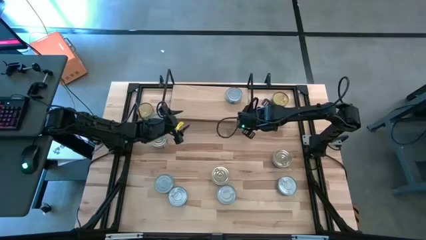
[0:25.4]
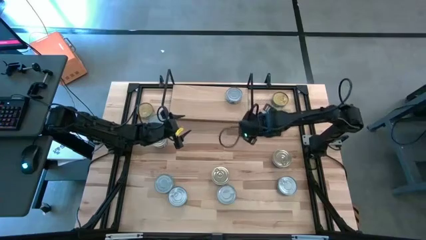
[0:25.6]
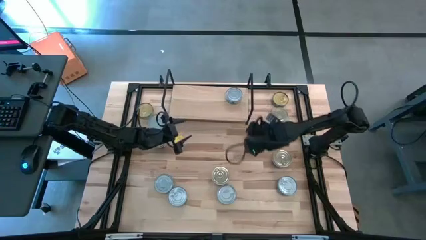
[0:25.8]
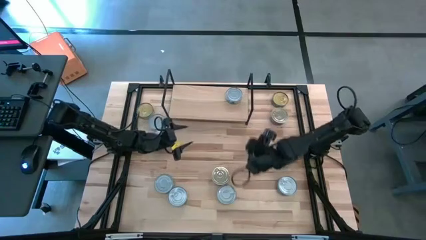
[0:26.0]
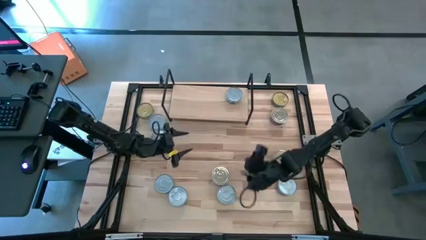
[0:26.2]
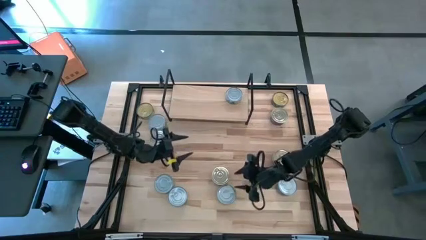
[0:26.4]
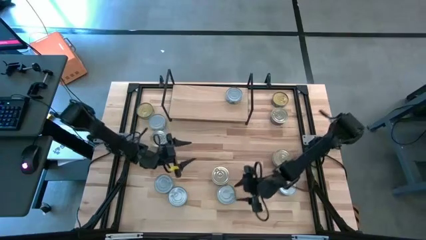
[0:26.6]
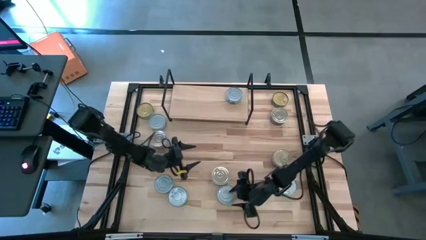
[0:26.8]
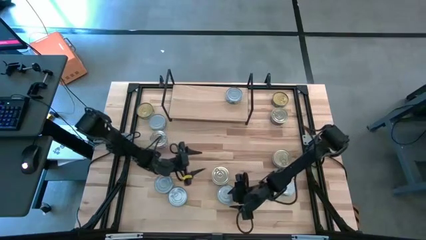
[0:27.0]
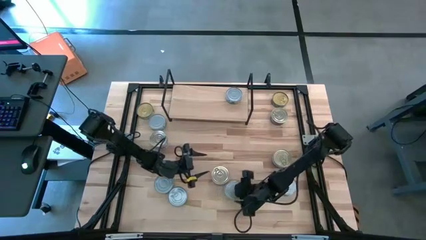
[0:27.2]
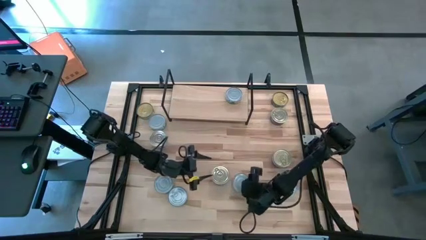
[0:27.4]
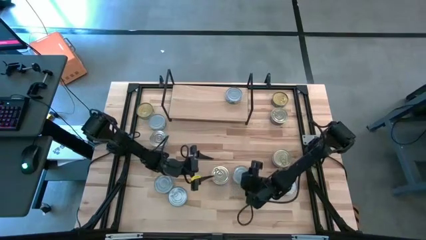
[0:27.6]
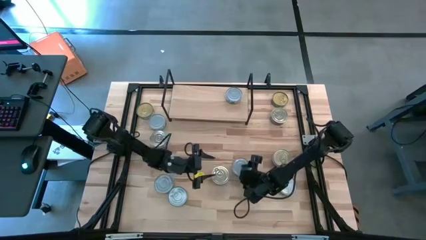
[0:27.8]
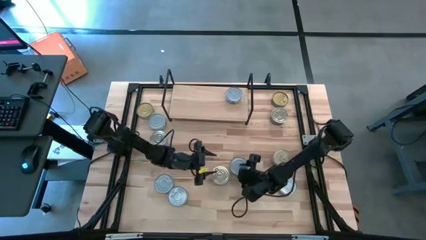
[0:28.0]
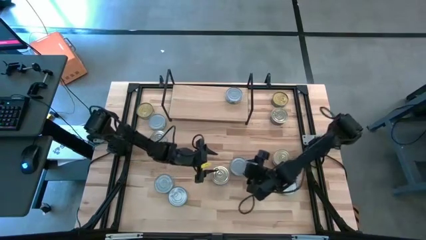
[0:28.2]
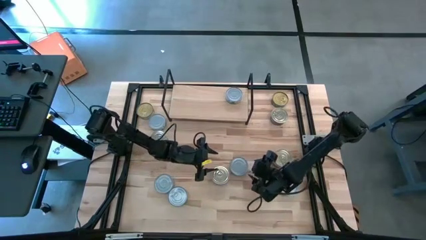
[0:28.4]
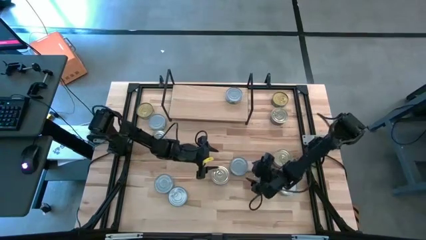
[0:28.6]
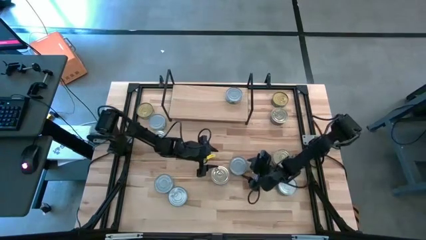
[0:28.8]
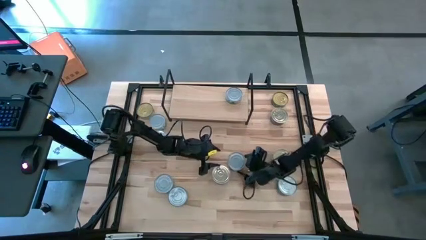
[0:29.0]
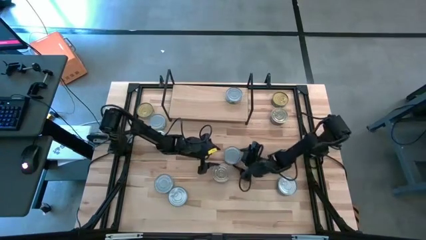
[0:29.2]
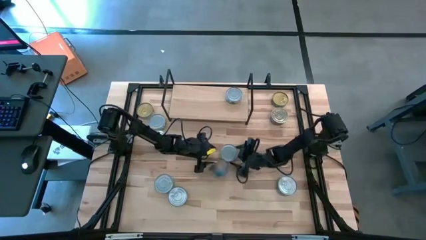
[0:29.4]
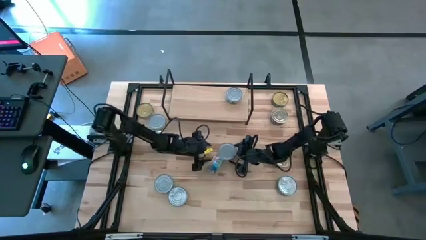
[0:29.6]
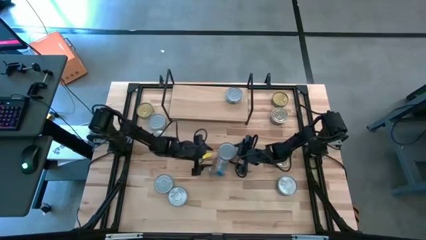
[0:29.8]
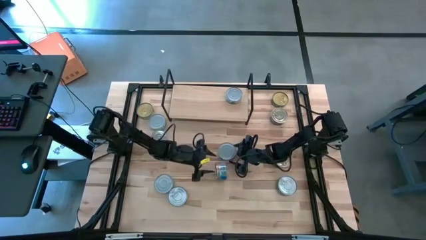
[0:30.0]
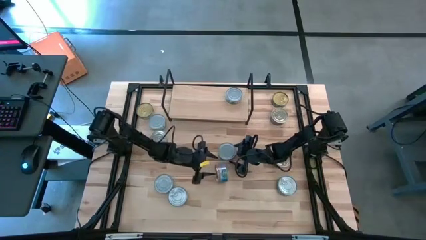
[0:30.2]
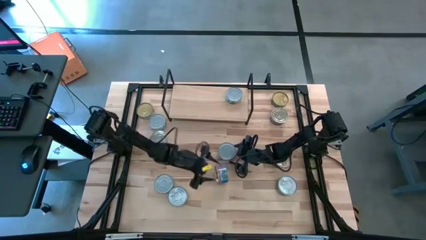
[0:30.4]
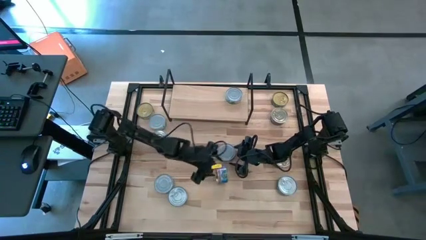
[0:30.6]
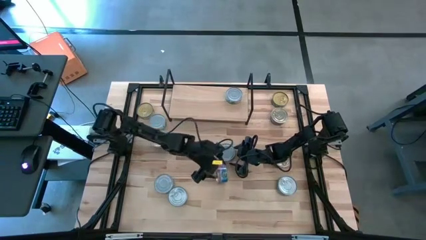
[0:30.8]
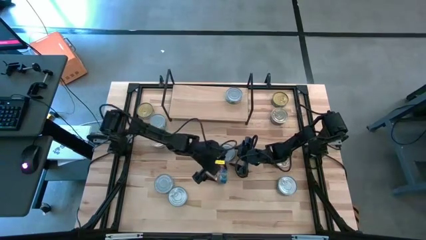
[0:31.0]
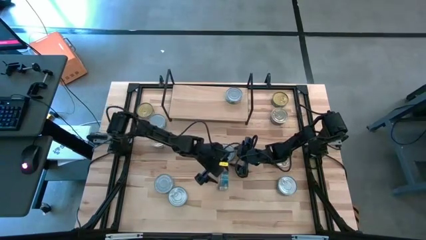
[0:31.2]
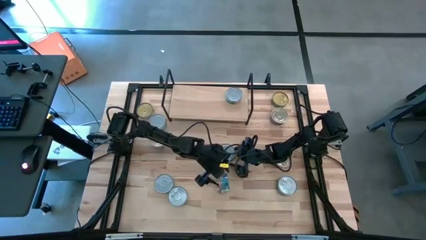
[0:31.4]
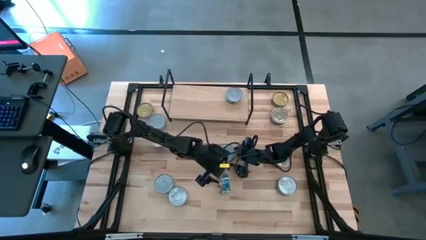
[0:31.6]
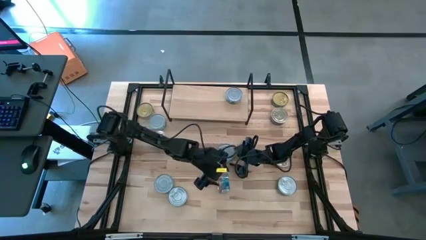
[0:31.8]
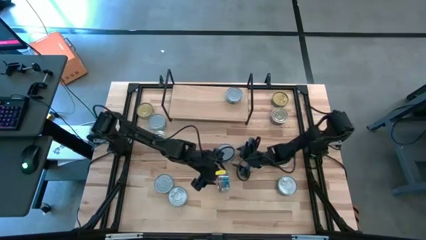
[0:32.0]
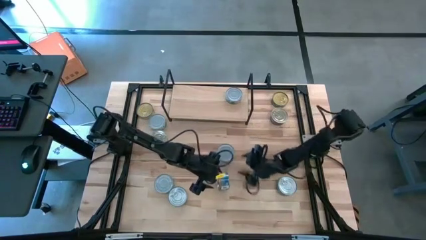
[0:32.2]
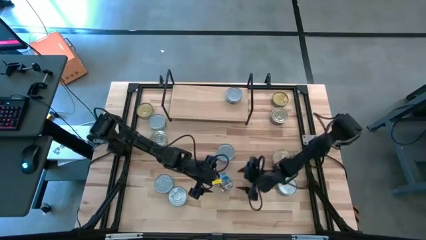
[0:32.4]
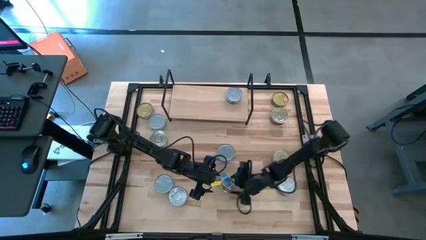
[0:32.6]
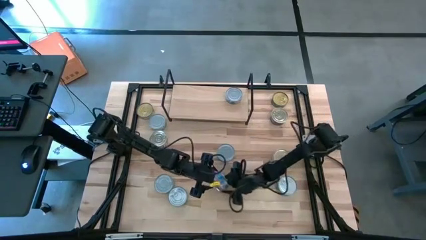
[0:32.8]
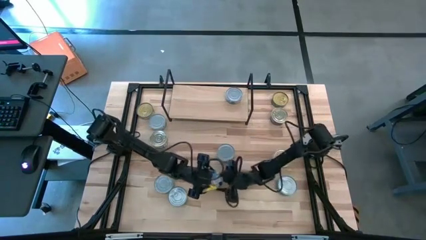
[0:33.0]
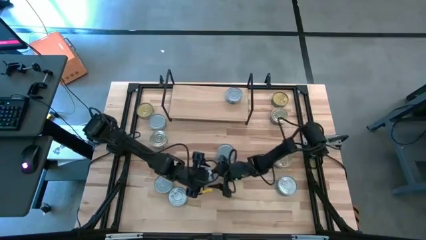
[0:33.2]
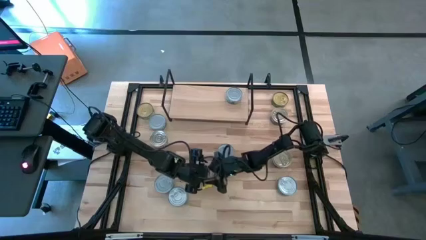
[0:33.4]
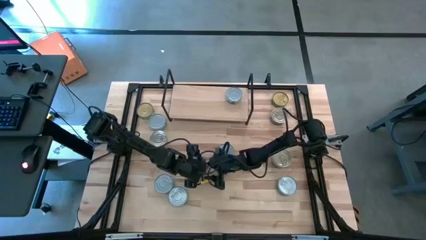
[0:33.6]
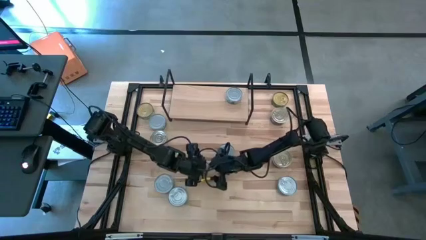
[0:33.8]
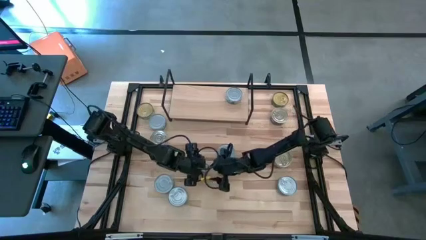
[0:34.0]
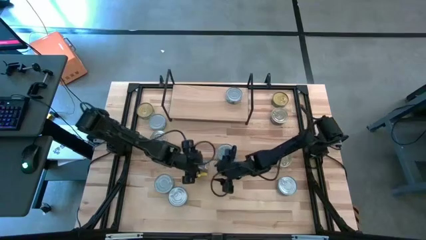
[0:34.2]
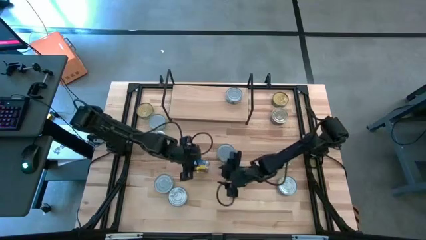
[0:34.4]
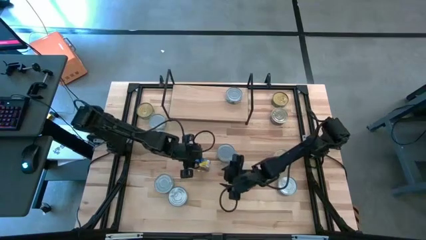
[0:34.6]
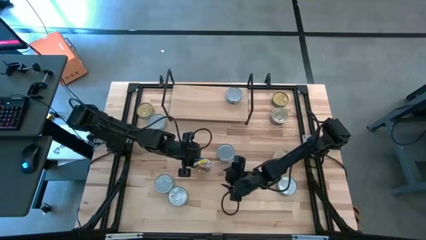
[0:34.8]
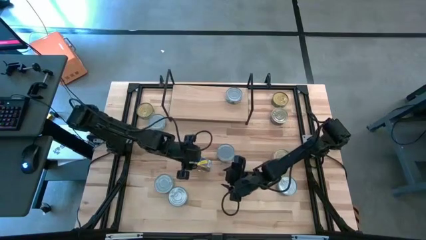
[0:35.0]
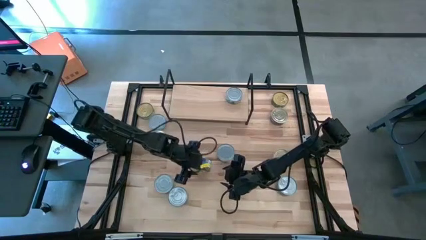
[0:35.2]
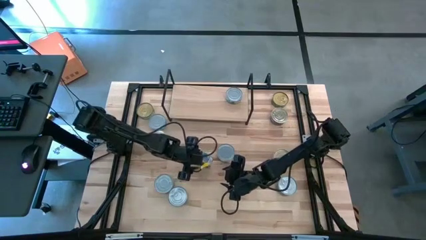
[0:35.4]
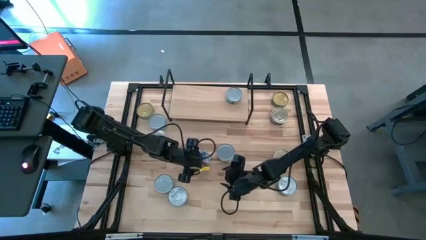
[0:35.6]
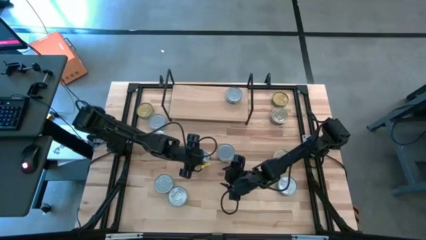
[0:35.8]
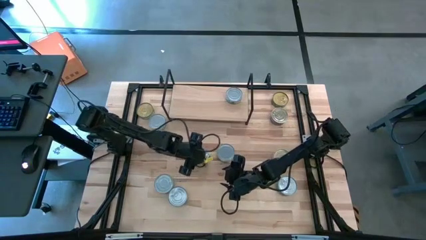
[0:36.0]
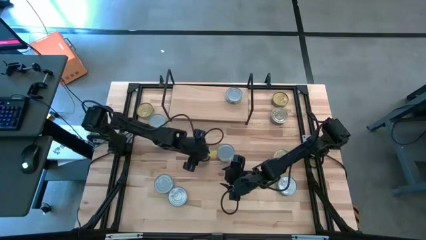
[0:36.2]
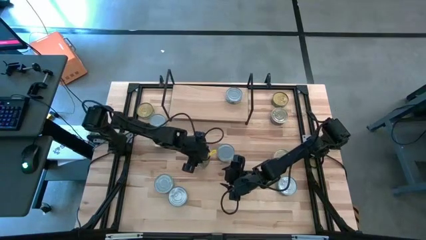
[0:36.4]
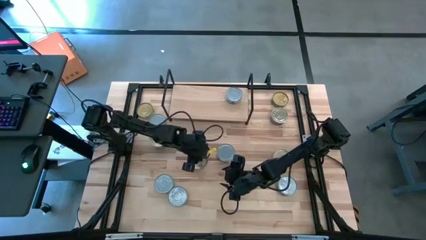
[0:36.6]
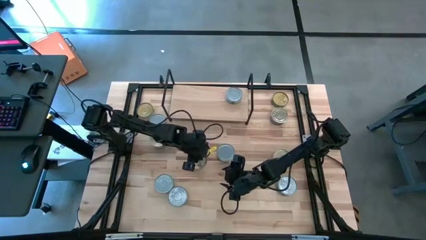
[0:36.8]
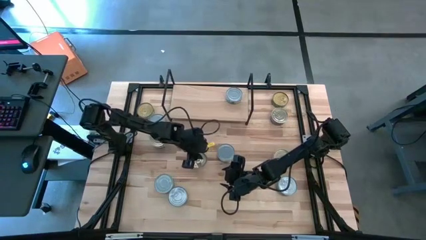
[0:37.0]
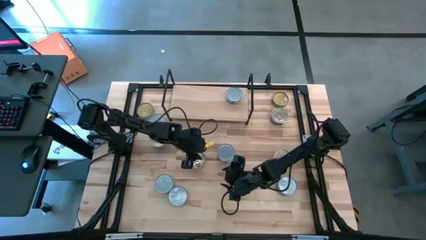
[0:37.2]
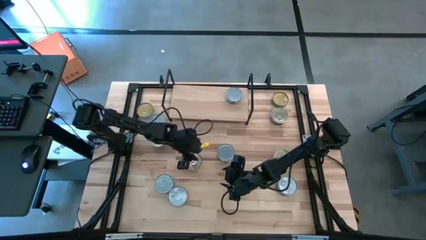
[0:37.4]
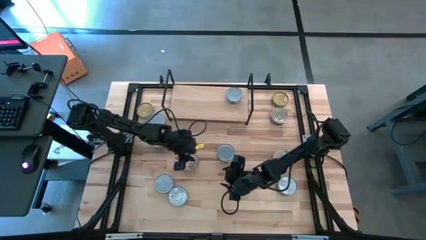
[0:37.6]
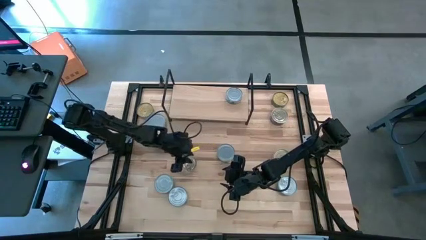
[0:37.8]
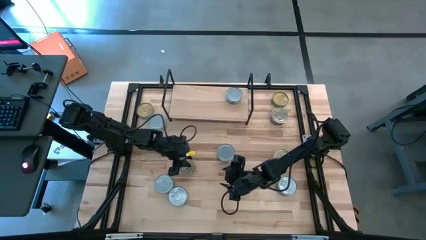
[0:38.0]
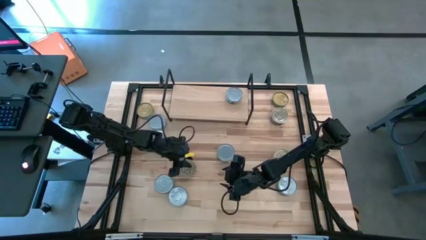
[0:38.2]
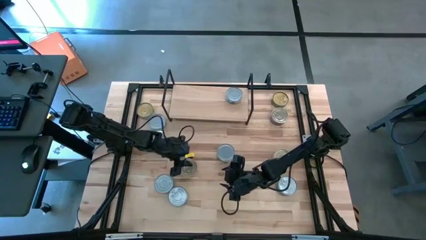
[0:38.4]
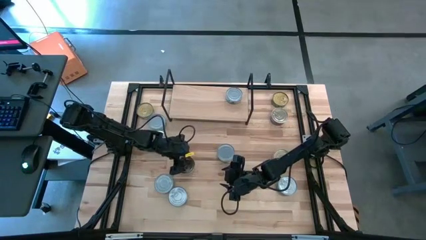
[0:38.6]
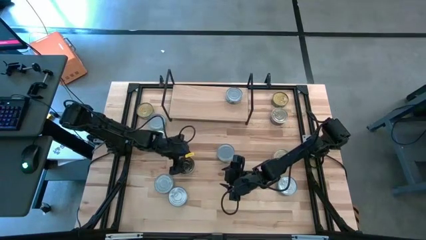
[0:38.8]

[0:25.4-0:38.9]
Task: Stack canned seafood by type on shelf
Adjust the cans

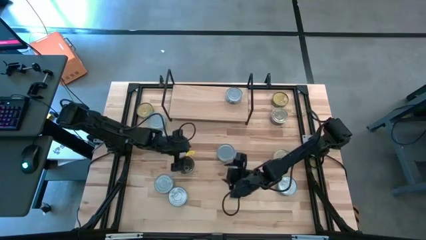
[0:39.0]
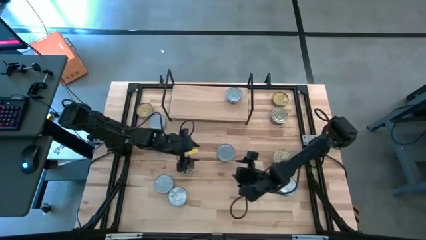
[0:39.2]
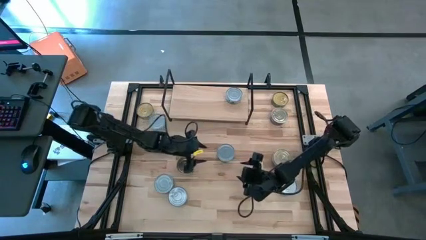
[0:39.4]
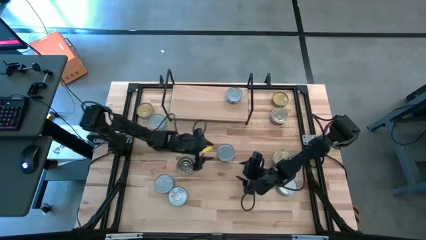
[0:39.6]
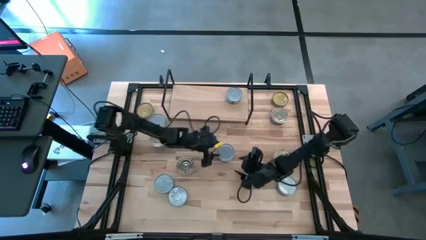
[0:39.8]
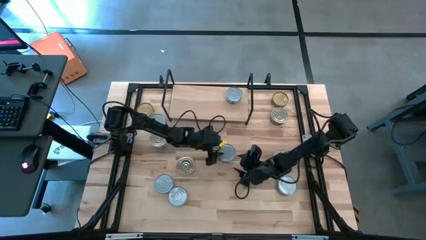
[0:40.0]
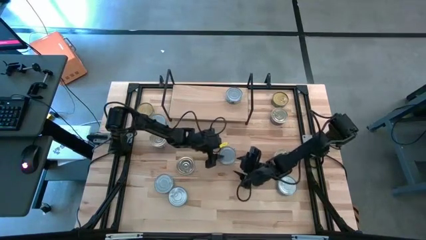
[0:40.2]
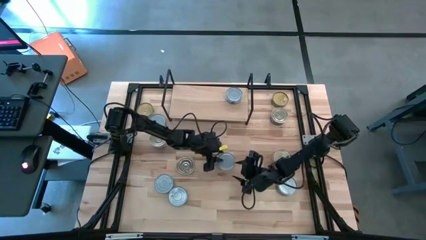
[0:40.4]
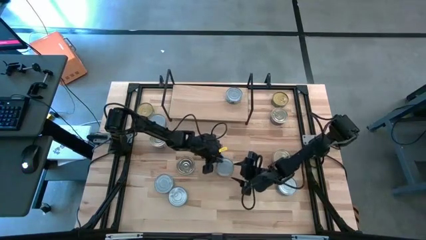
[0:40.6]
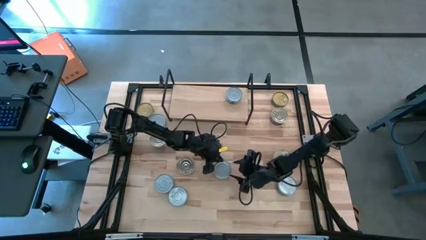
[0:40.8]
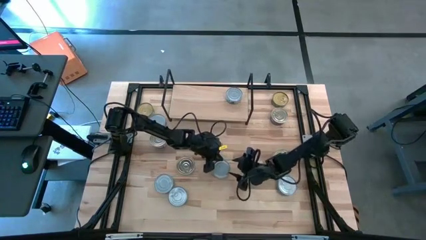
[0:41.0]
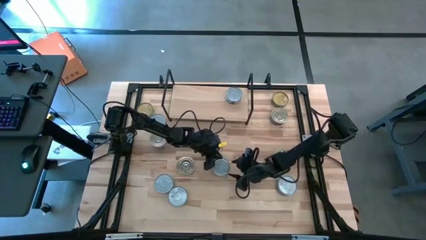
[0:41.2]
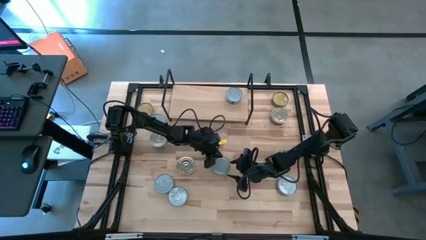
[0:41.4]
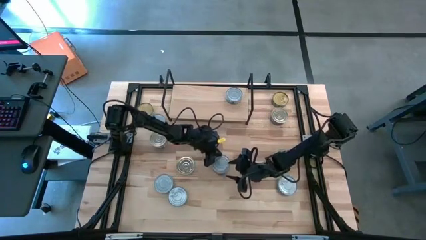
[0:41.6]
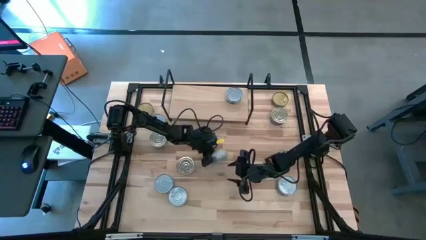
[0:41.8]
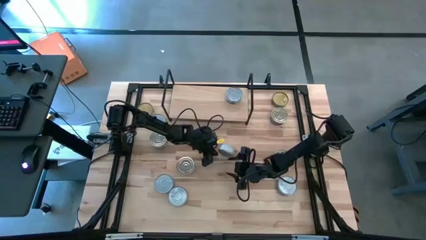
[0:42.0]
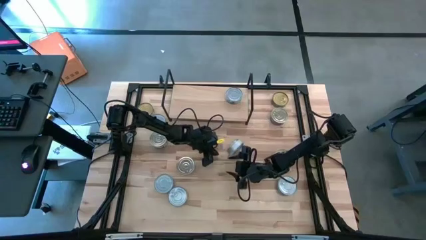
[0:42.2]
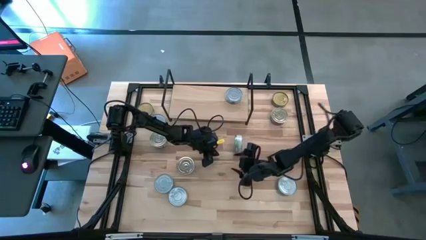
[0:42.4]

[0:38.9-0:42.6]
Stack the green-white tuna can on top of the green-white tuna can on the shelf
